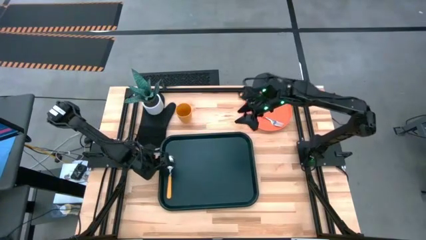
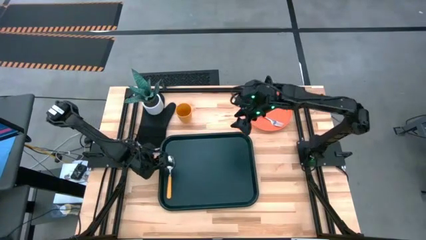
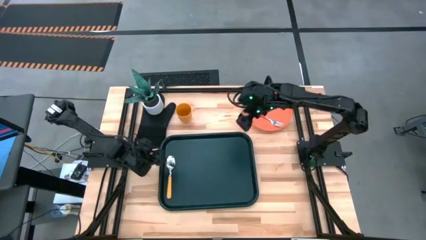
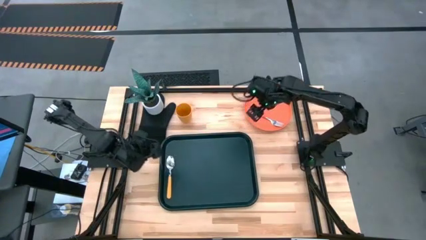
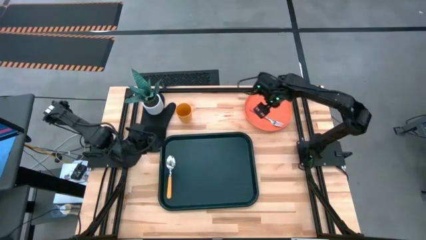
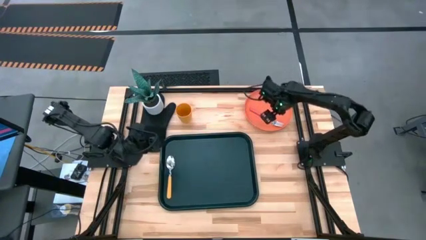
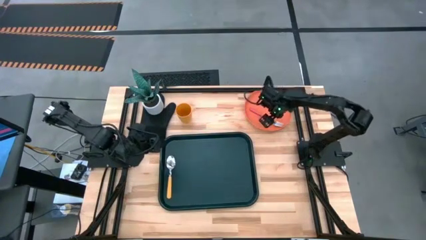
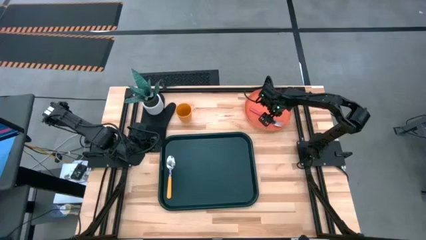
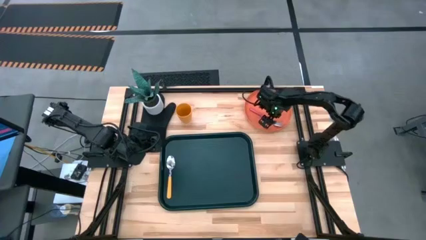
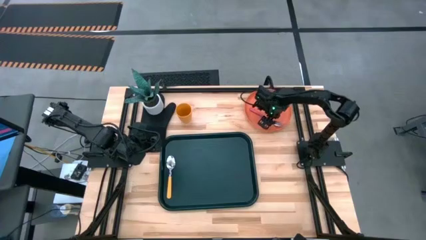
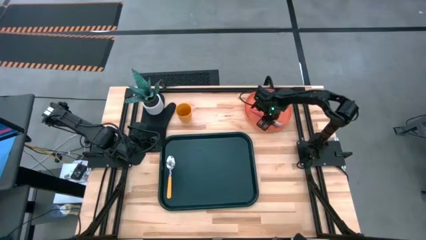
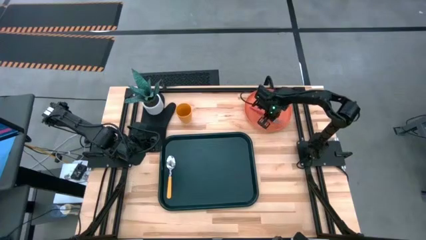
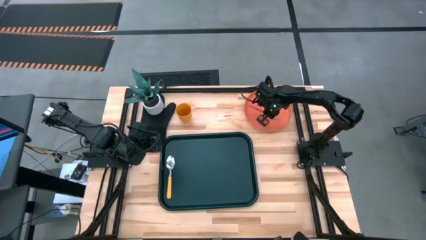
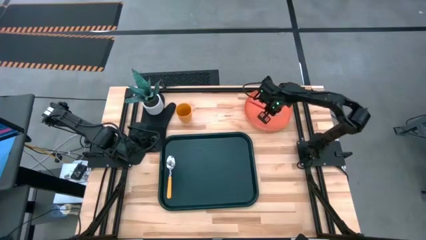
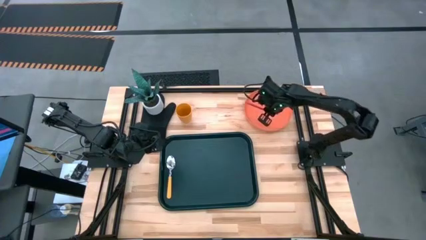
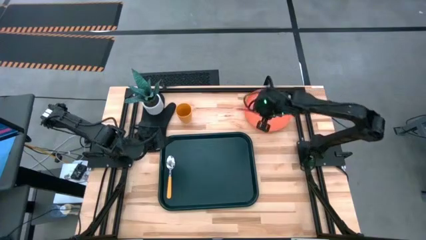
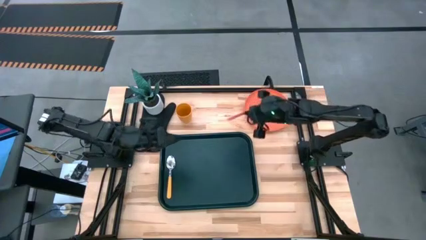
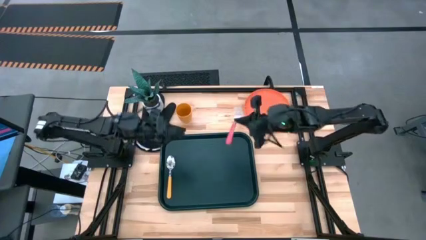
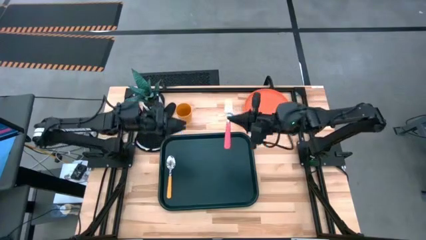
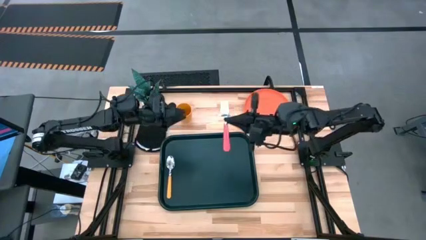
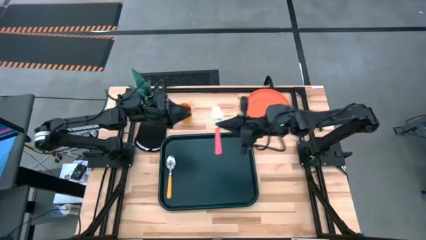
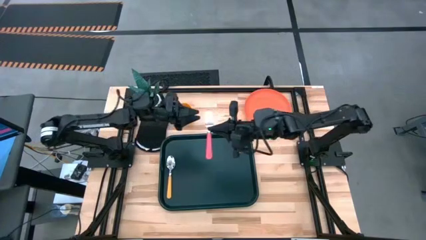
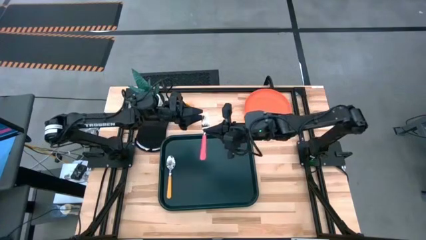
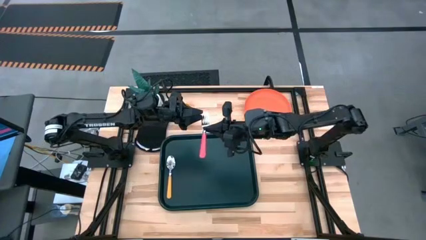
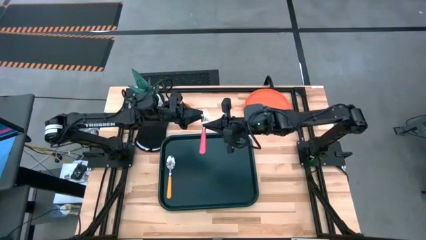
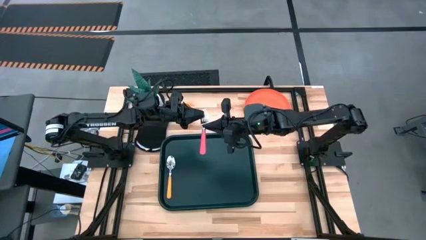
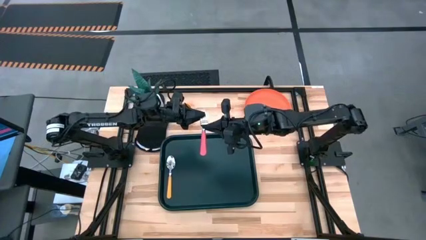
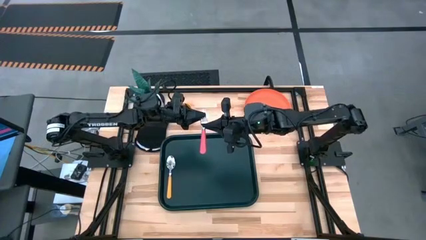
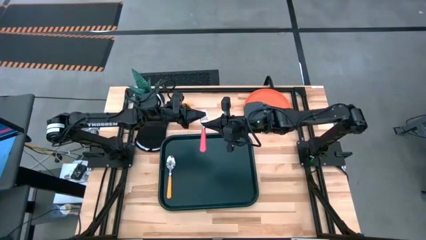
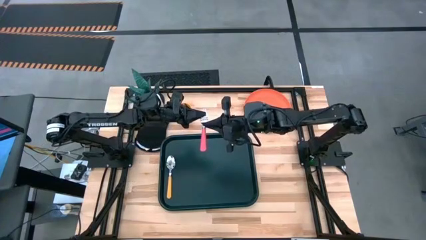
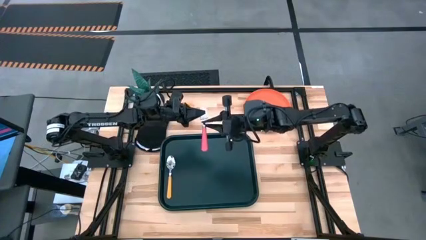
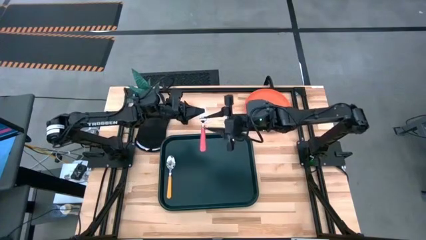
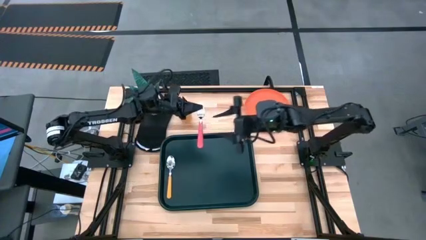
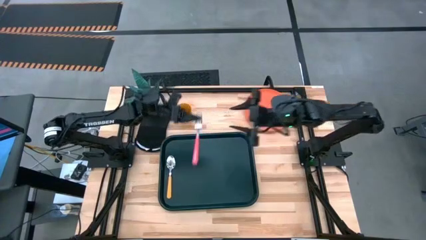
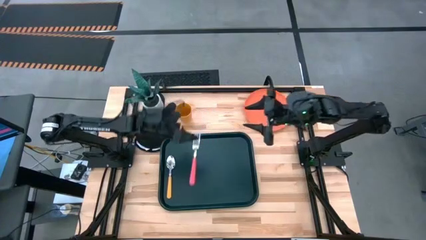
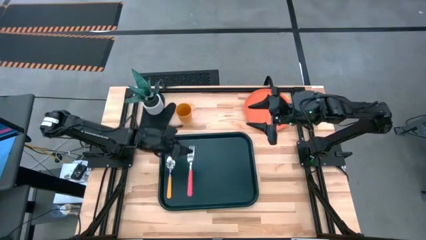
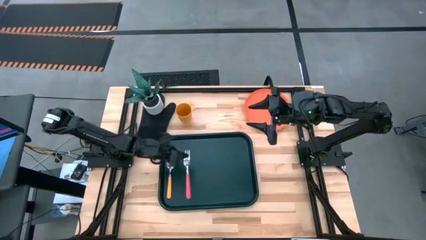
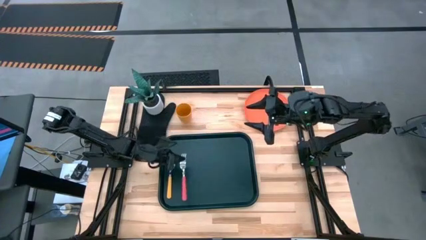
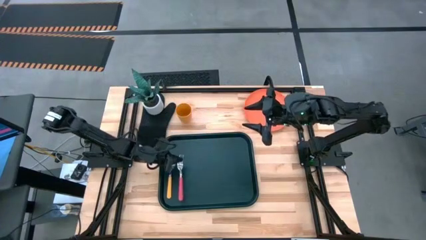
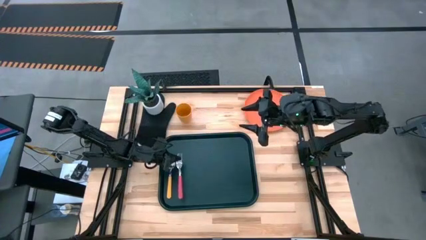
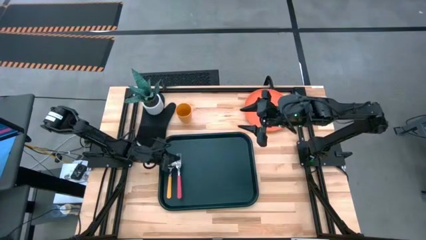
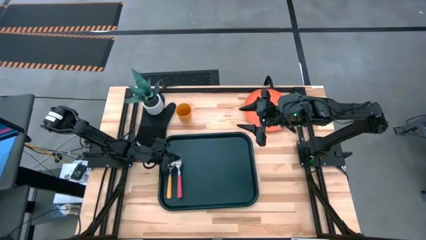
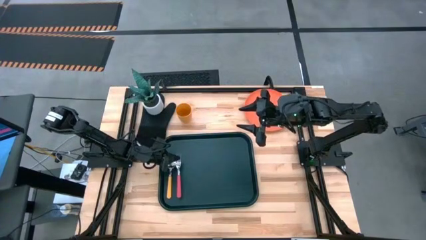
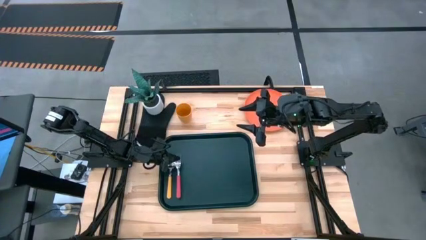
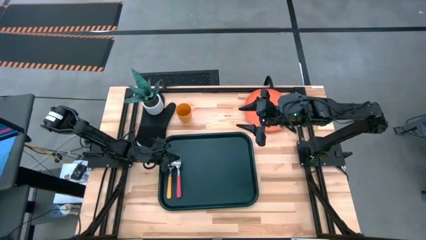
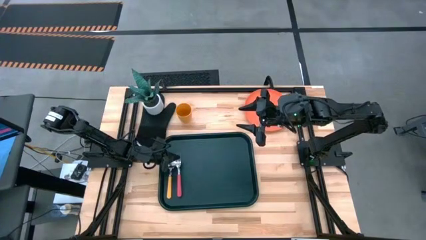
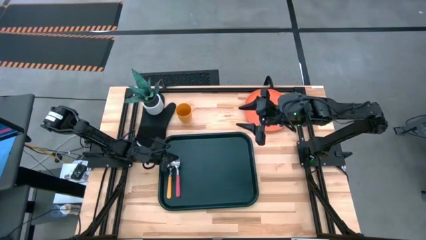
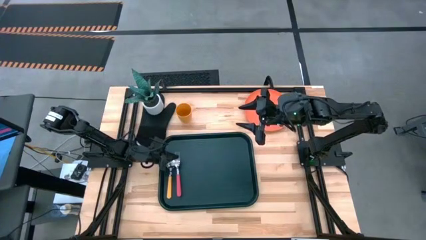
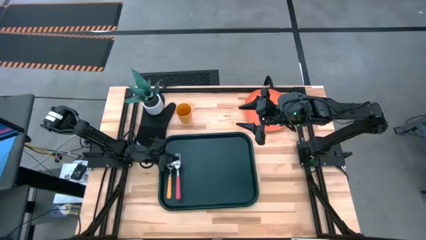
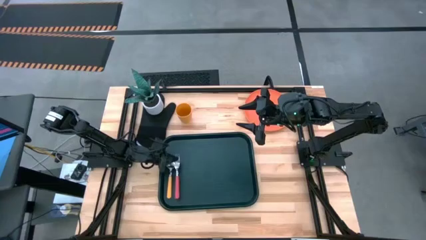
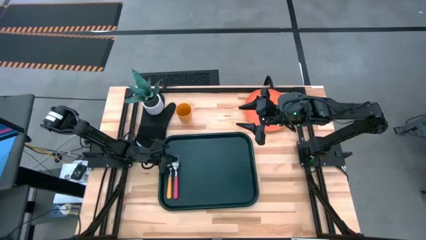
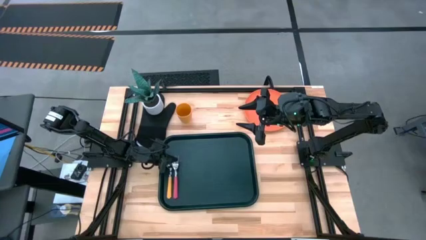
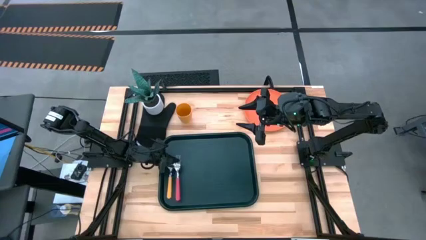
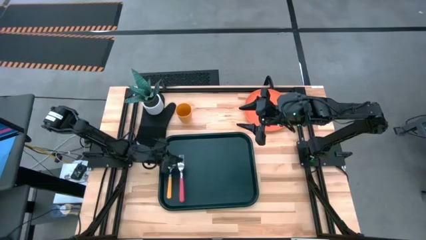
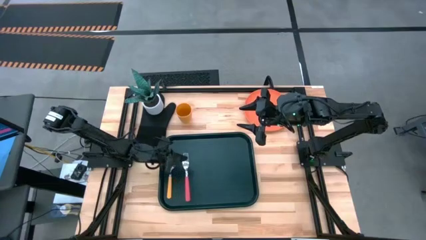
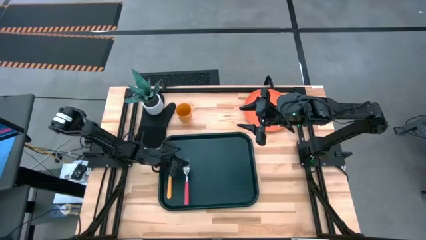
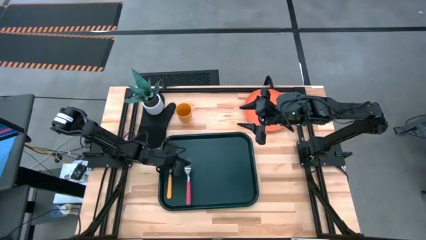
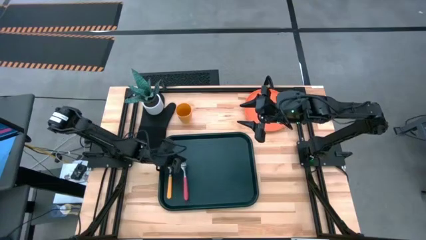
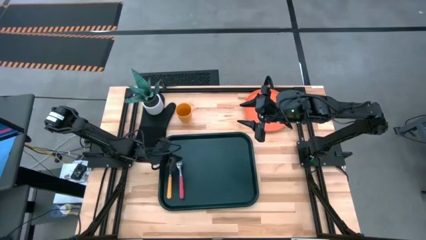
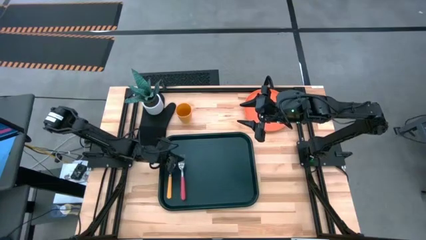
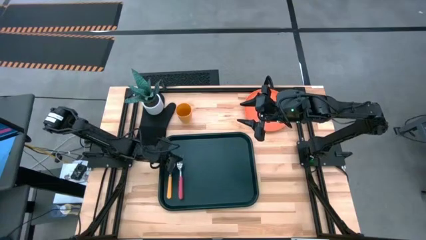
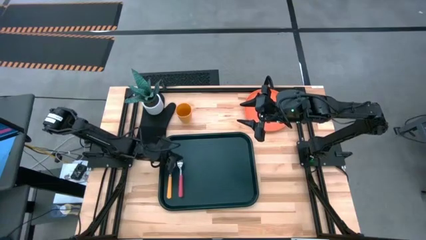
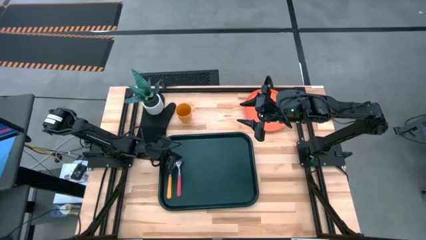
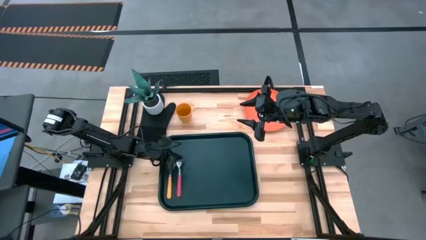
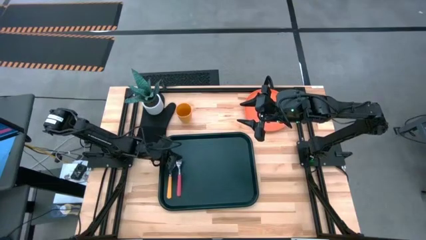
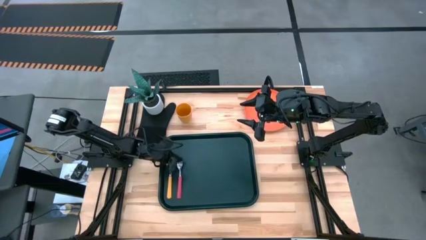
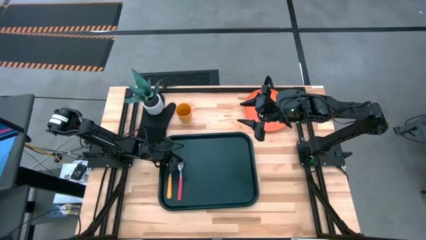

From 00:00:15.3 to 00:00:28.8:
Task: Pick and place plate/cup/fork/spoon on tray
Put the pink fork to the right of the yellow spoon on the black serving tray
